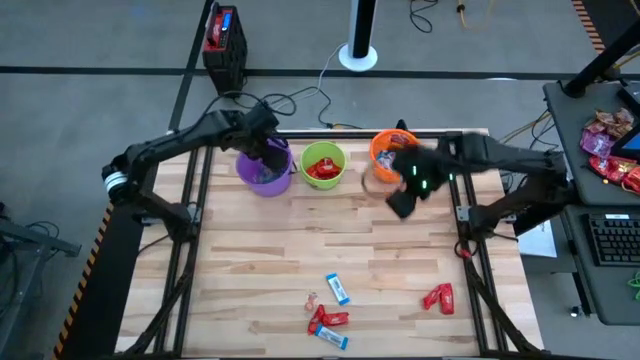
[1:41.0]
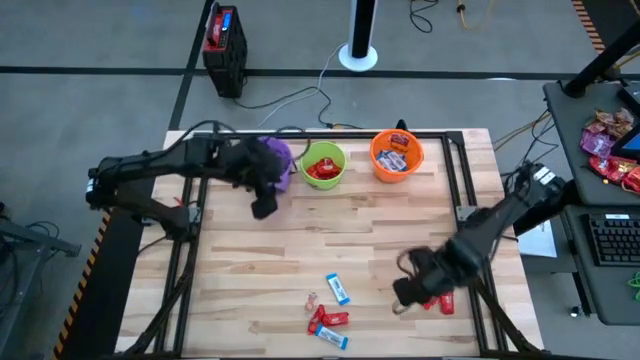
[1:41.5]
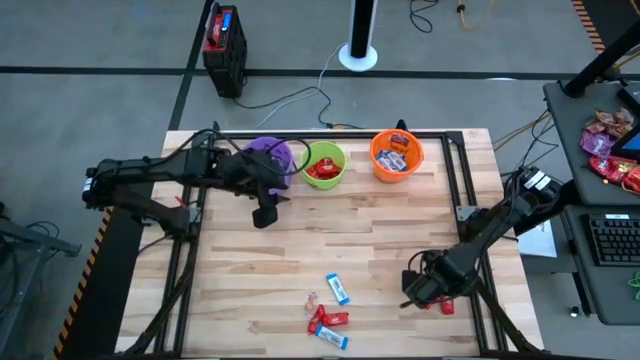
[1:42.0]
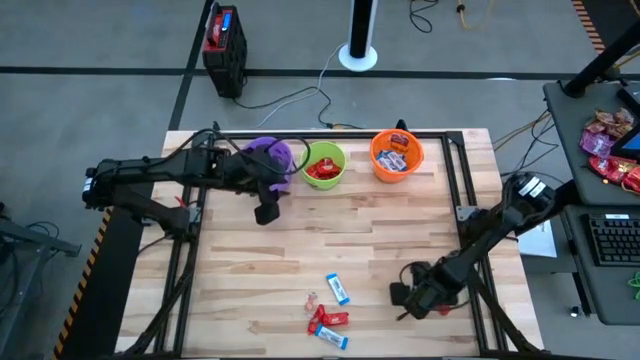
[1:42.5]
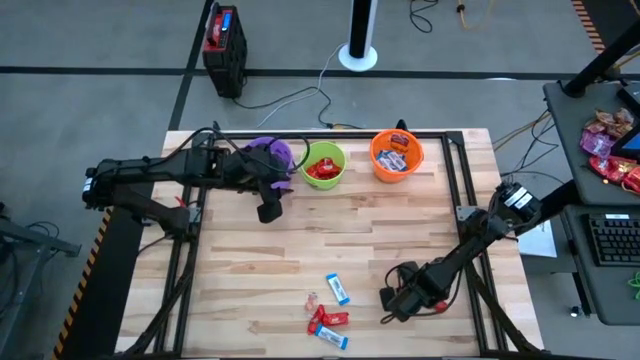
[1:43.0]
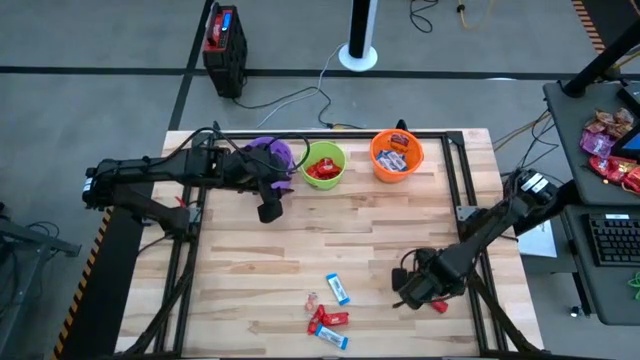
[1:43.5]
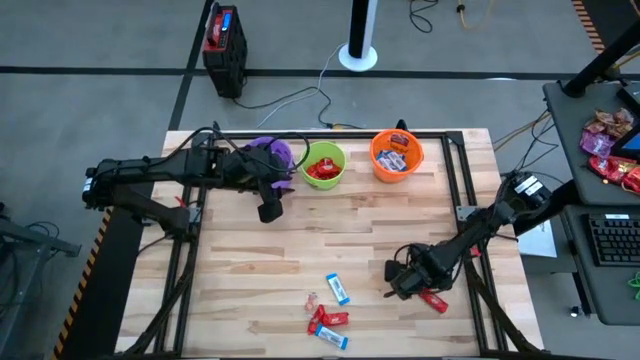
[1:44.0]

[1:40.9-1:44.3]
Task: Sort candy by brand, put in halloween buckets
Put the red chocolate bar into the green bucket

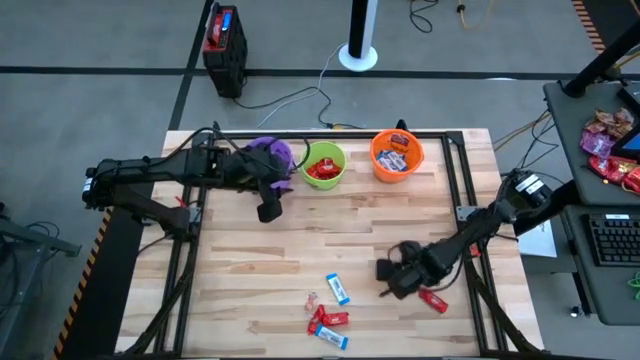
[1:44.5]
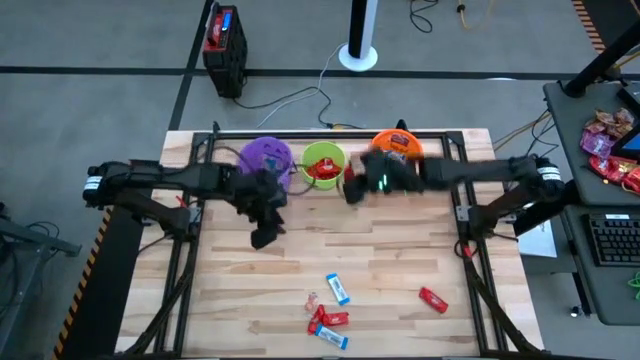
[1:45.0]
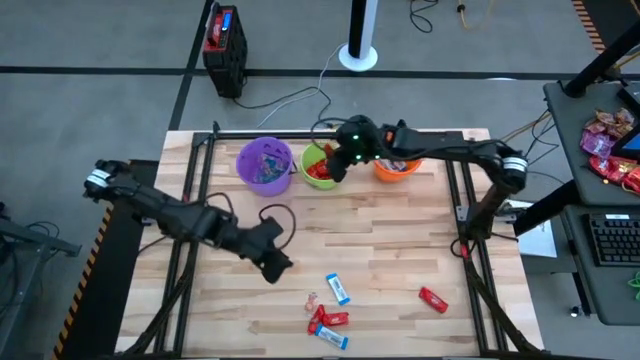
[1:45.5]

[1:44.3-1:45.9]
Put the red chocolate bar into the green bucket

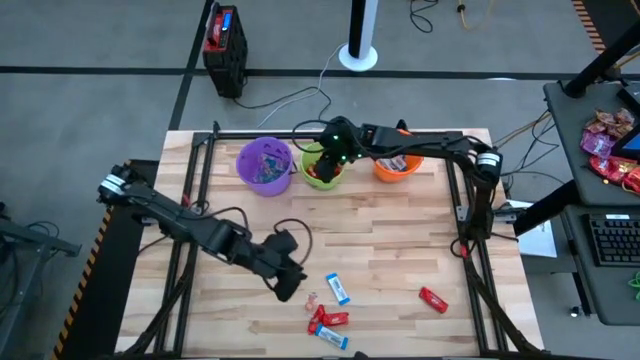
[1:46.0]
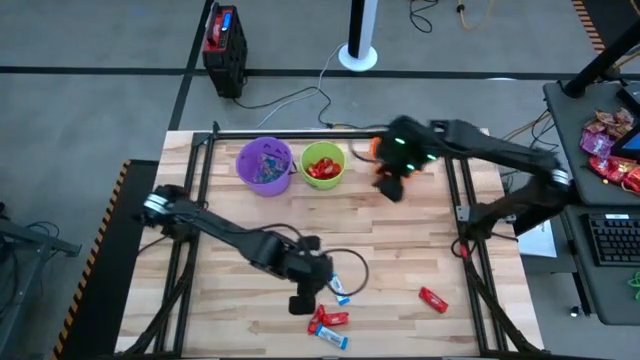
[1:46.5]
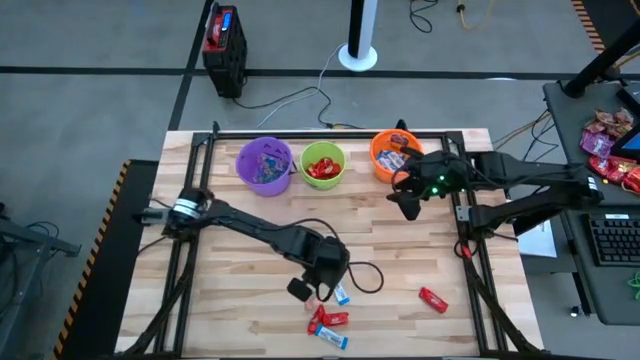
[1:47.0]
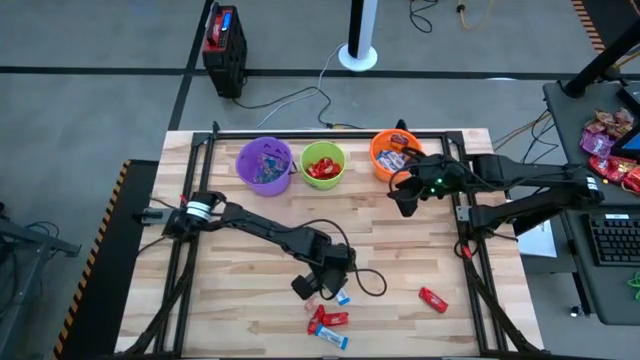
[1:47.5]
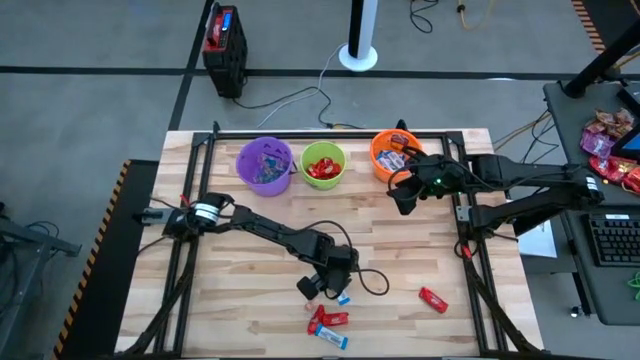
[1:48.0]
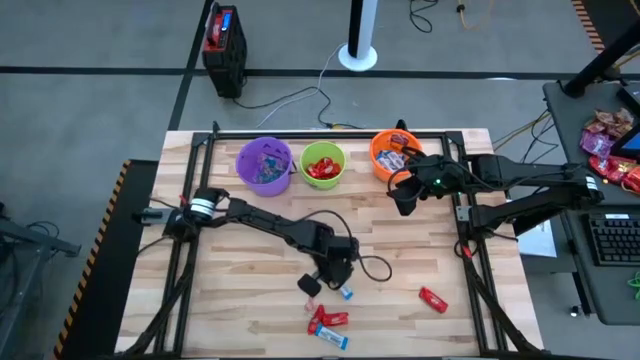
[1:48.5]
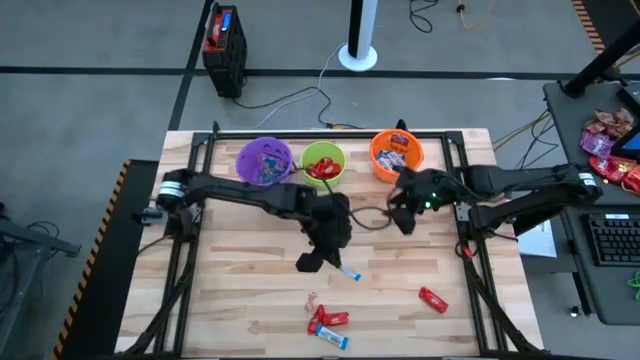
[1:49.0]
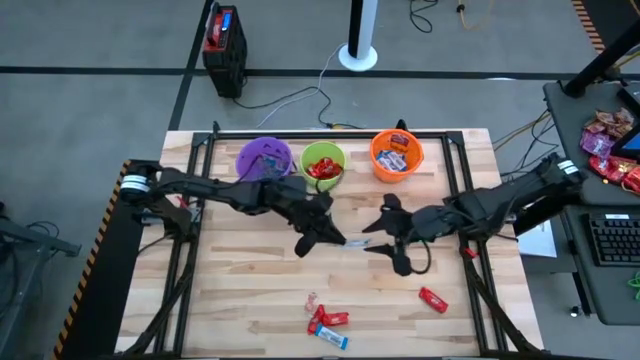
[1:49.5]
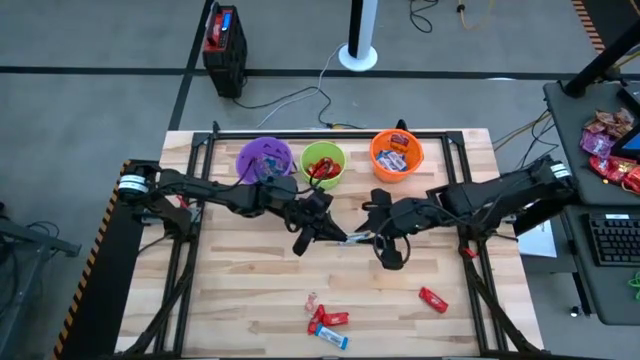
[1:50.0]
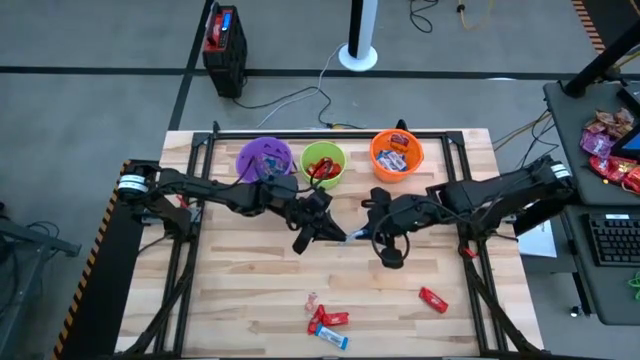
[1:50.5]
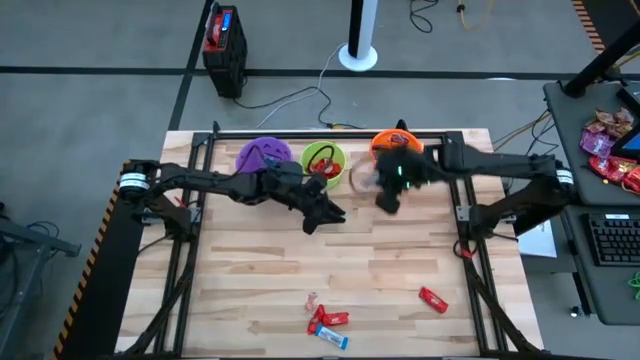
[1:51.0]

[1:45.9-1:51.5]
Put the white chocolate bar into the orange bucket

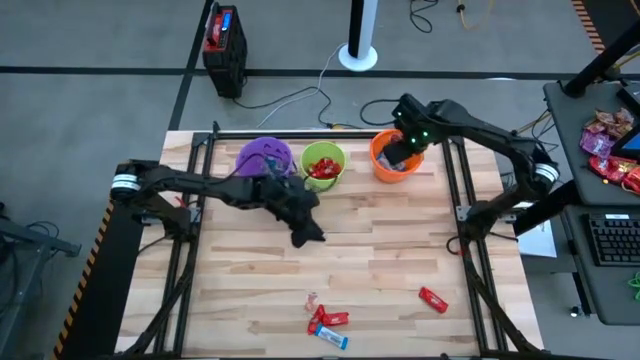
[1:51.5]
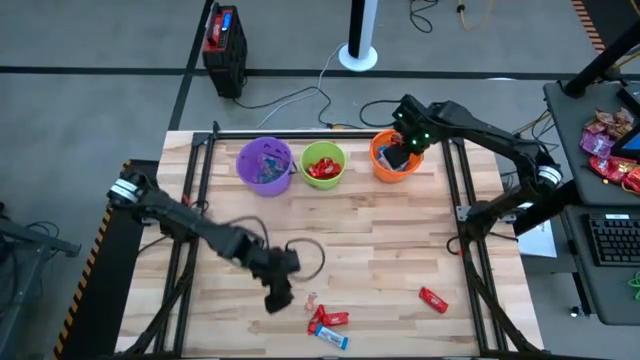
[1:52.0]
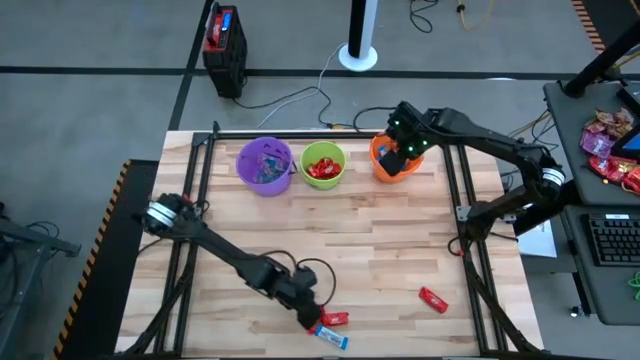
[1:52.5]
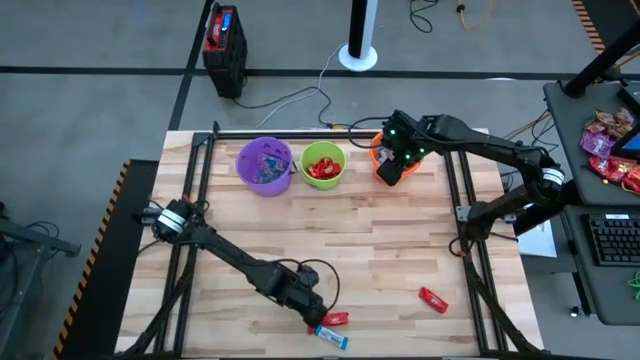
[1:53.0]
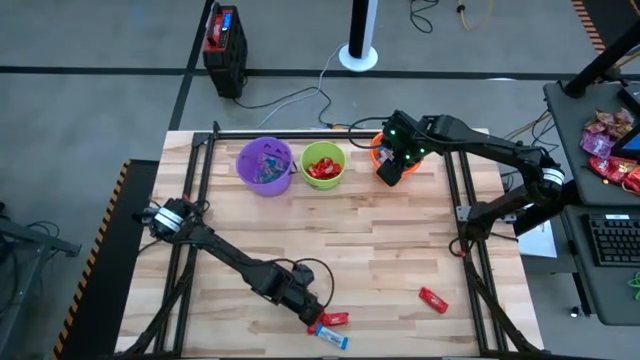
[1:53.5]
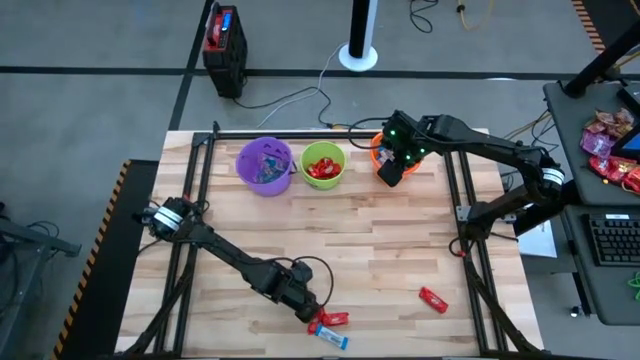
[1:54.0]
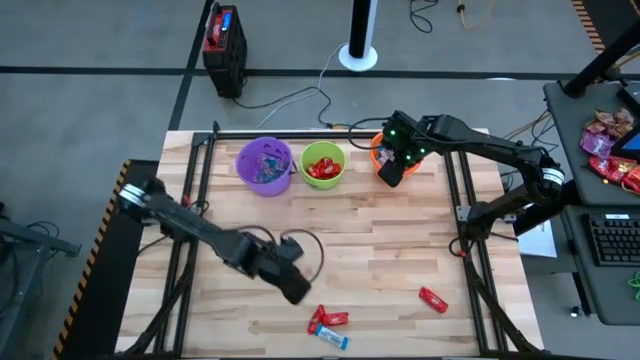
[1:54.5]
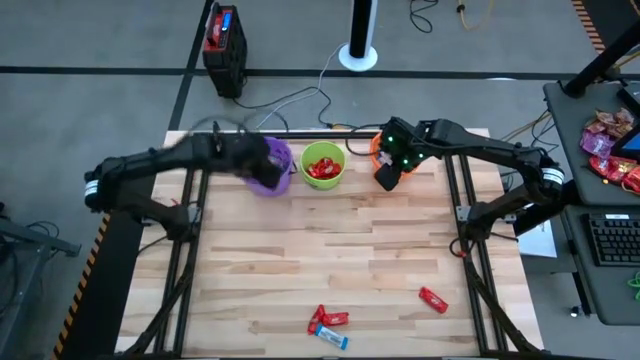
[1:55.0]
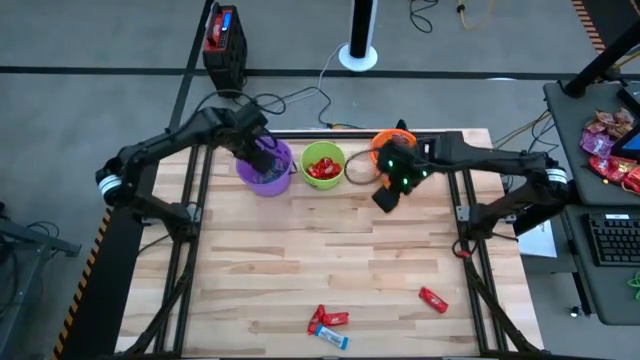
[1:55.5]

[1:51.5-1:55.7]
Put the orange gummy candy into the purple bucket

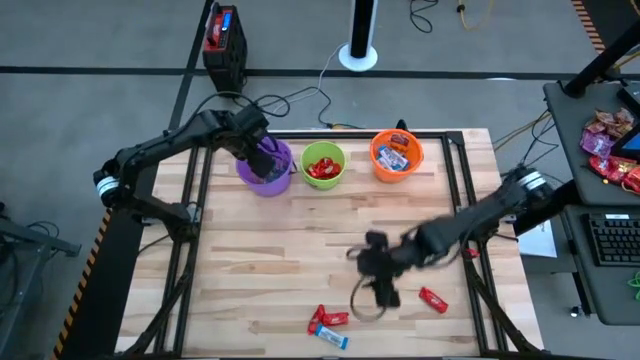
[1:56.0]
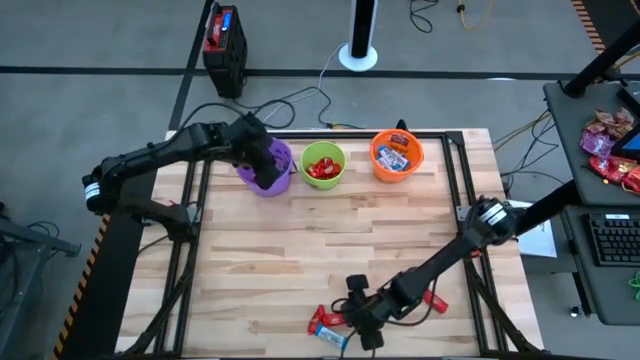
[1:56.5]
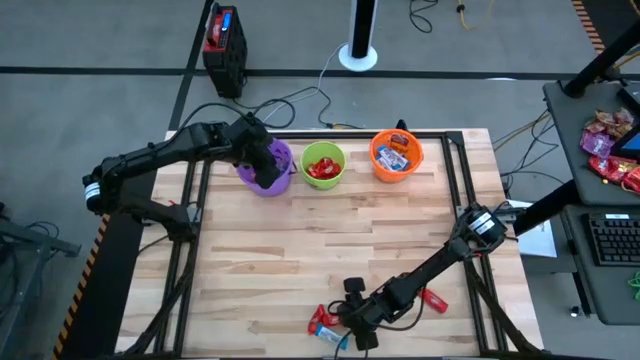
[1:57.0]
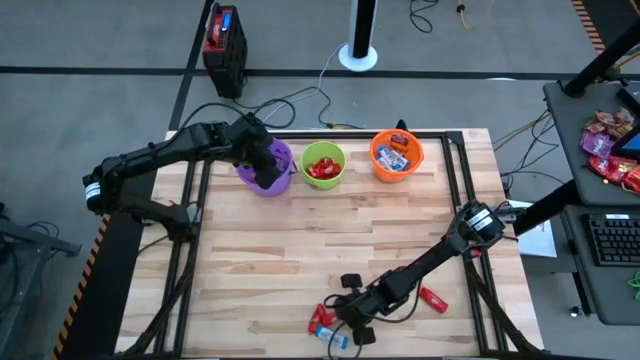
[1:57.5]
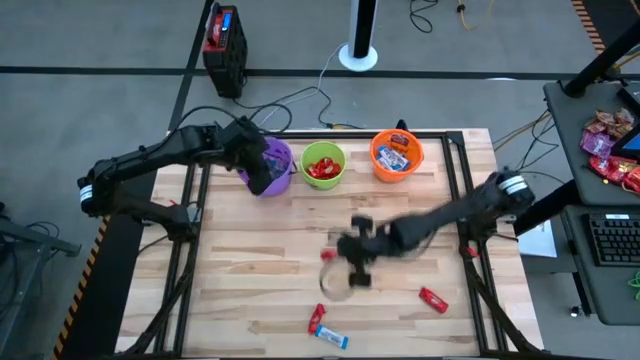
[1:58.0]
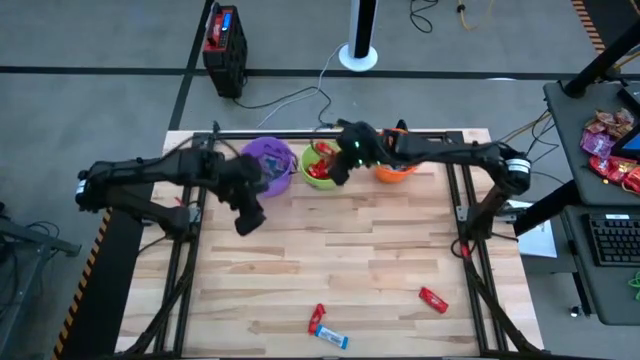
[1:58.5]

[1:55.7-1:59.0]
Put the red chocolate bar into the green bucket

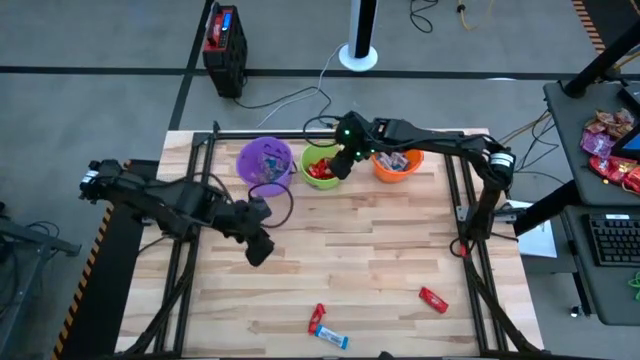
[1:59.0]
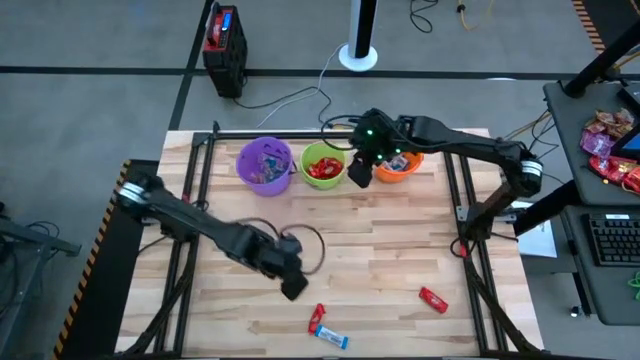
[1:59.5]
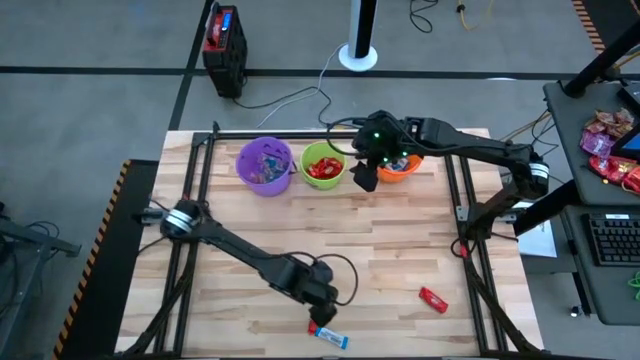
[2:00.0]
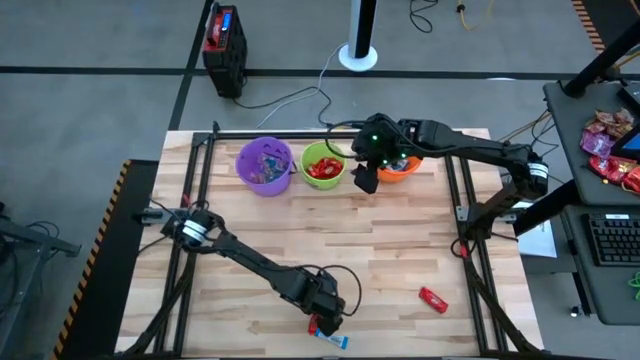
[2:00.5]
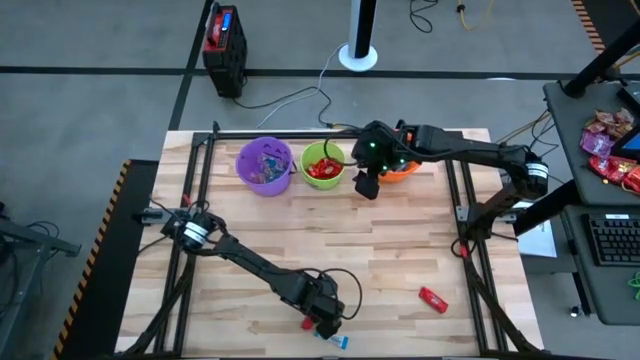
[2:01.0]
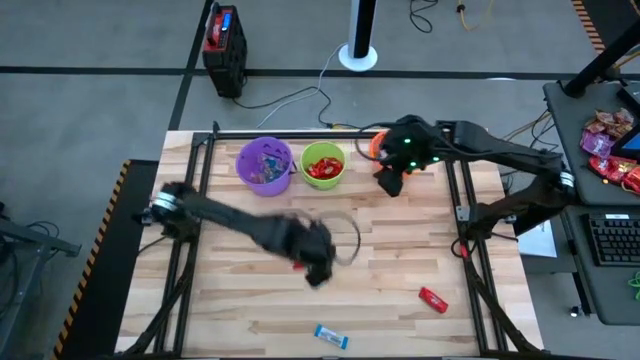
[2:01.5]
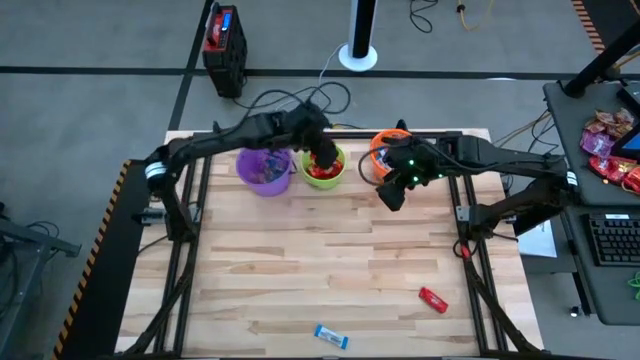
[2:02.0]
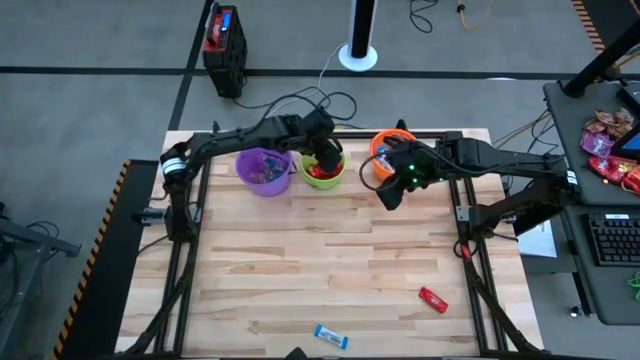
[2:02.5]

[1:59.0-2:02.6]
Put the red chocolate bar into the green bucket
